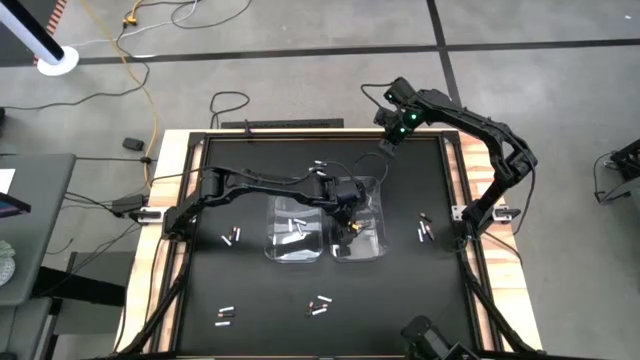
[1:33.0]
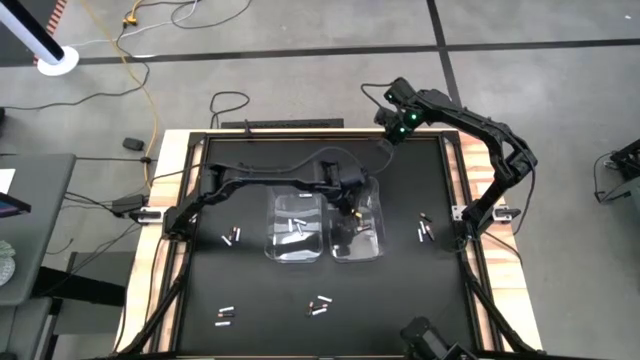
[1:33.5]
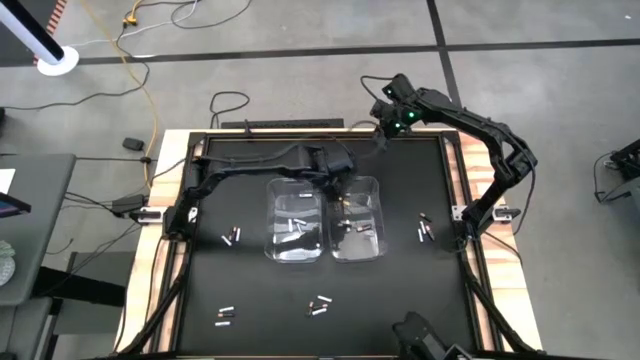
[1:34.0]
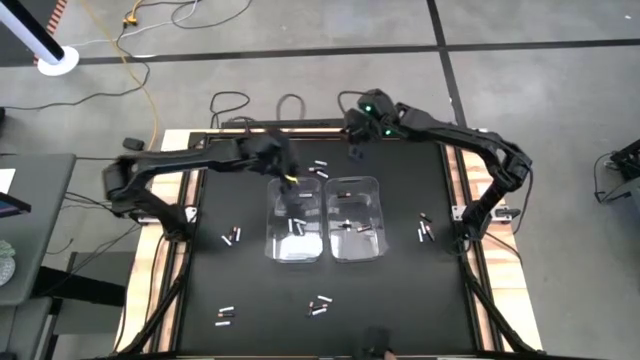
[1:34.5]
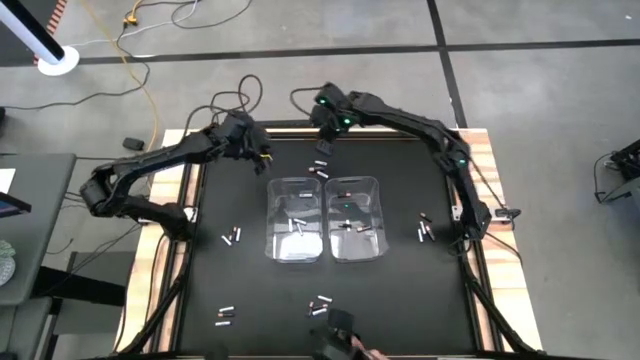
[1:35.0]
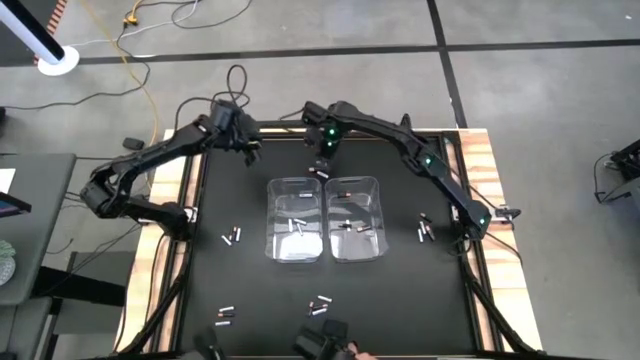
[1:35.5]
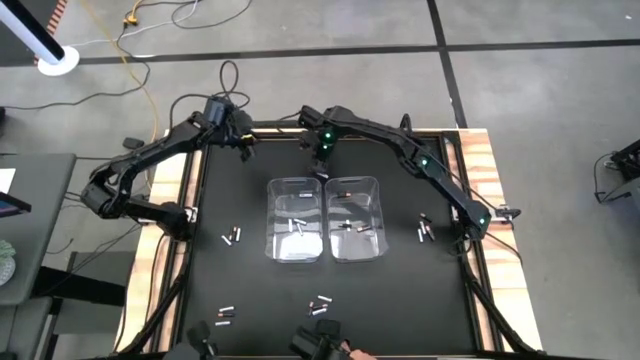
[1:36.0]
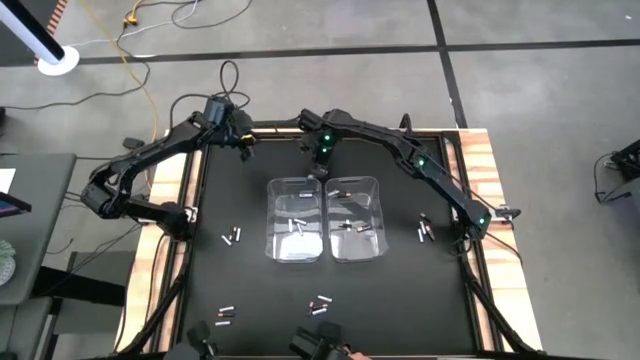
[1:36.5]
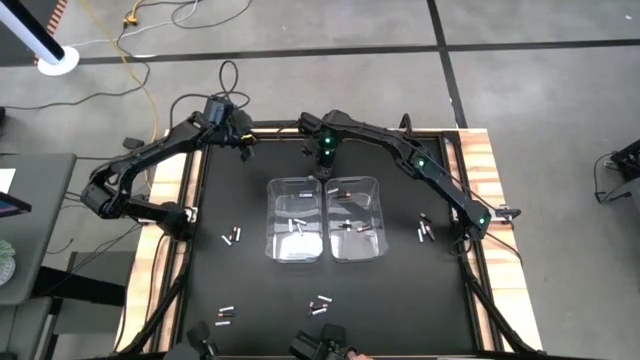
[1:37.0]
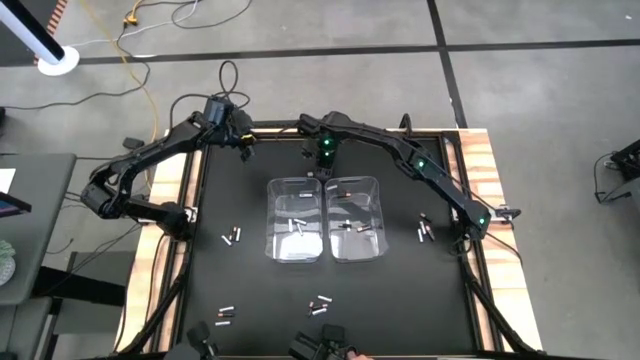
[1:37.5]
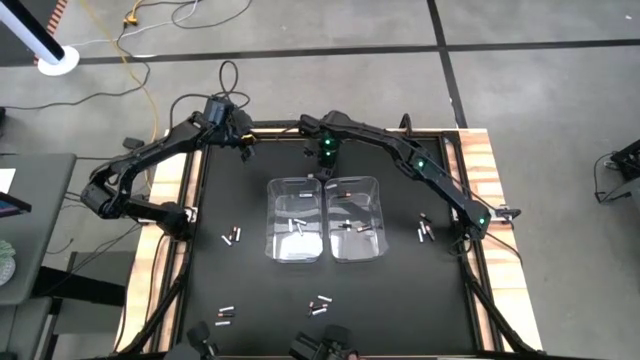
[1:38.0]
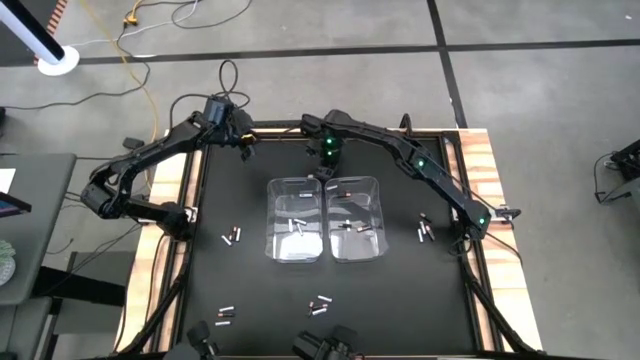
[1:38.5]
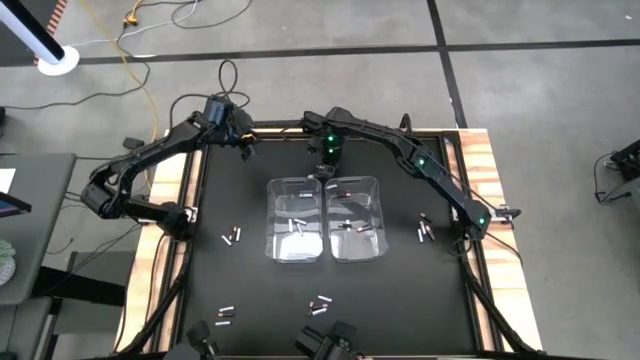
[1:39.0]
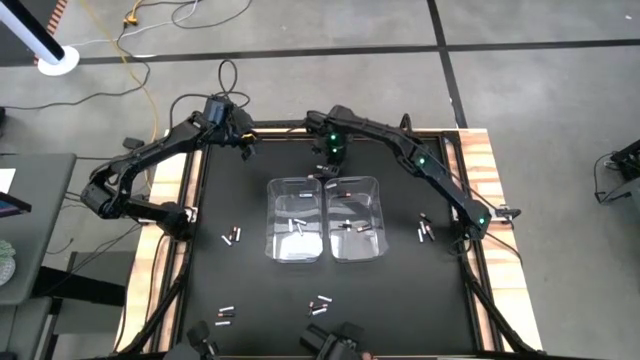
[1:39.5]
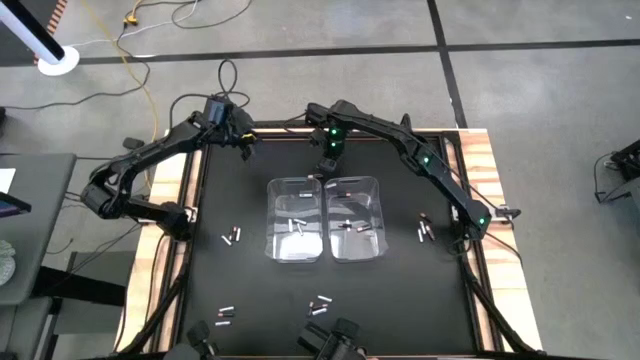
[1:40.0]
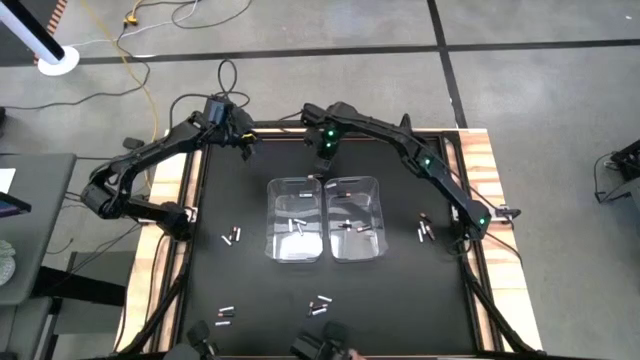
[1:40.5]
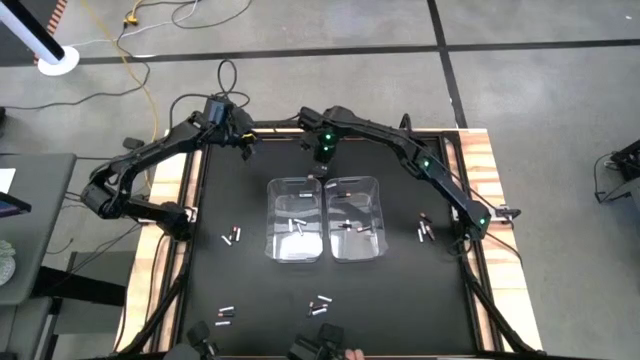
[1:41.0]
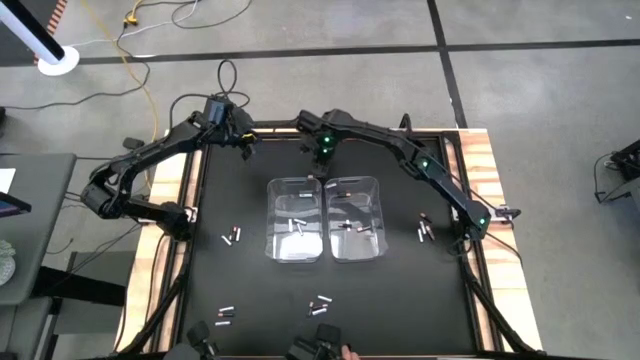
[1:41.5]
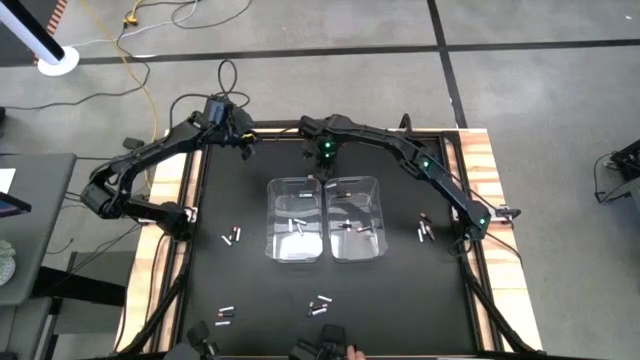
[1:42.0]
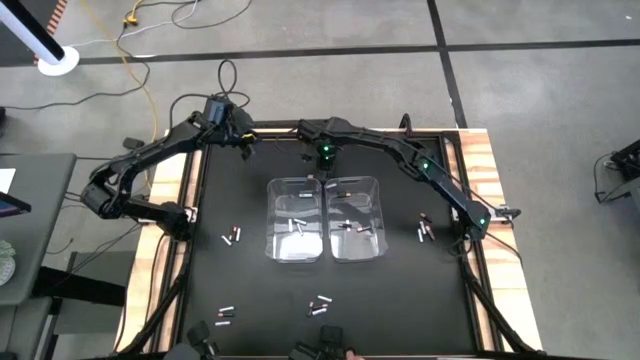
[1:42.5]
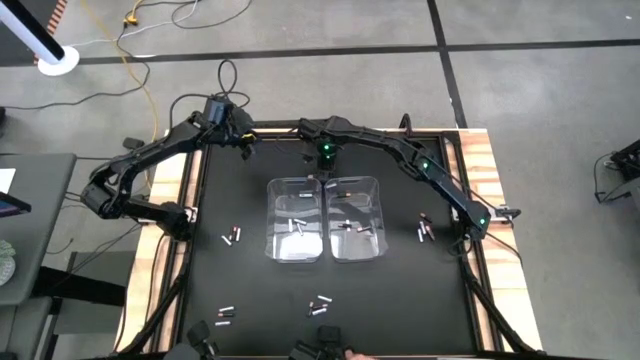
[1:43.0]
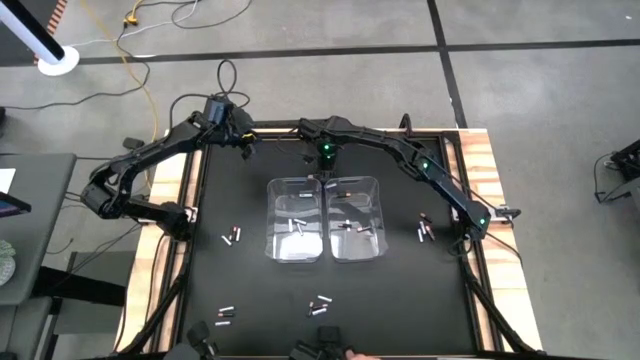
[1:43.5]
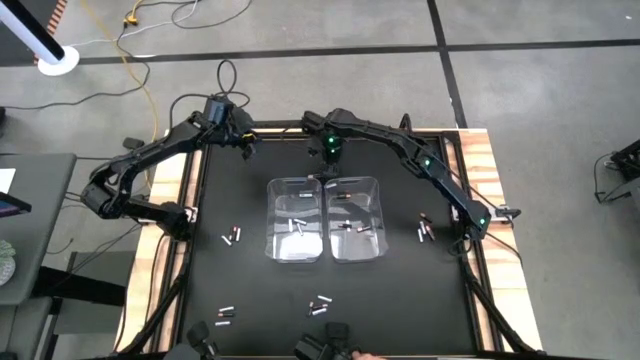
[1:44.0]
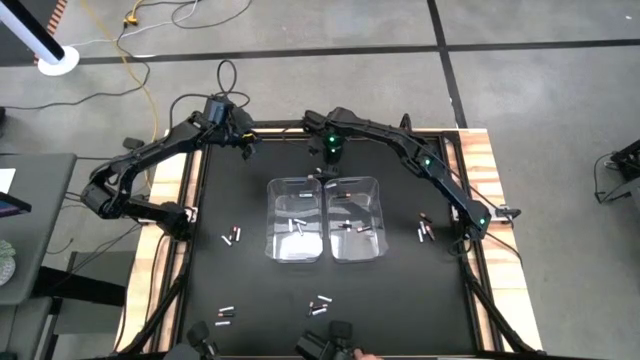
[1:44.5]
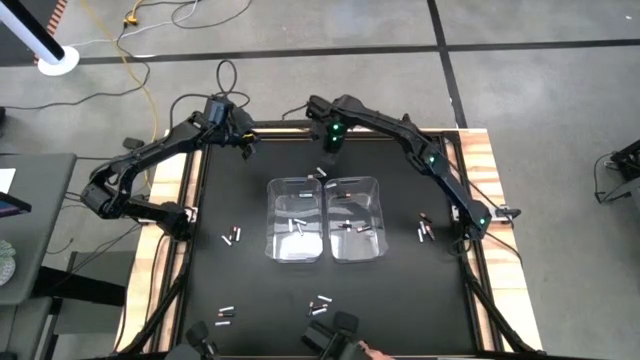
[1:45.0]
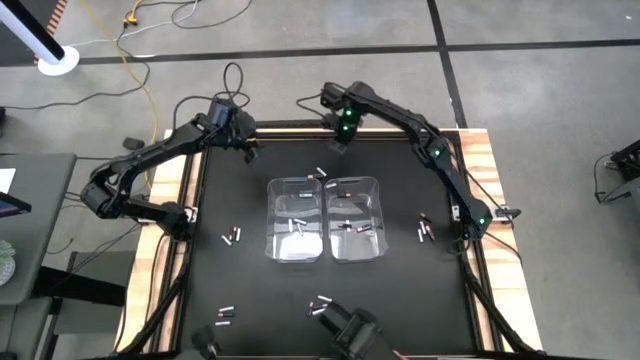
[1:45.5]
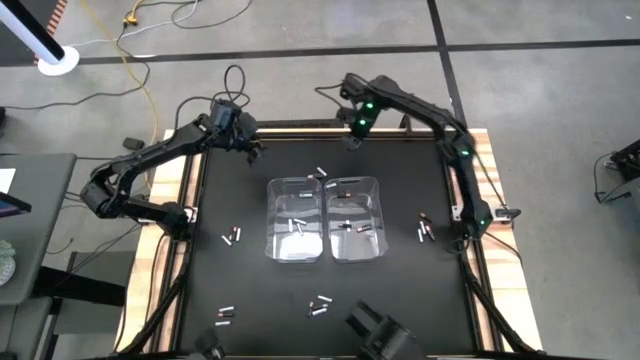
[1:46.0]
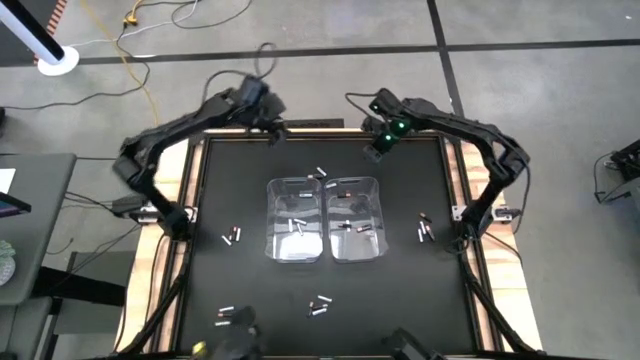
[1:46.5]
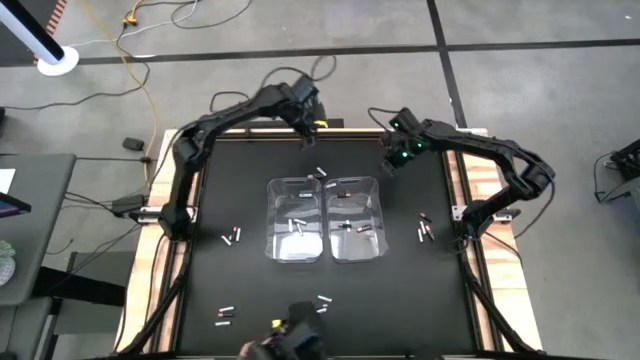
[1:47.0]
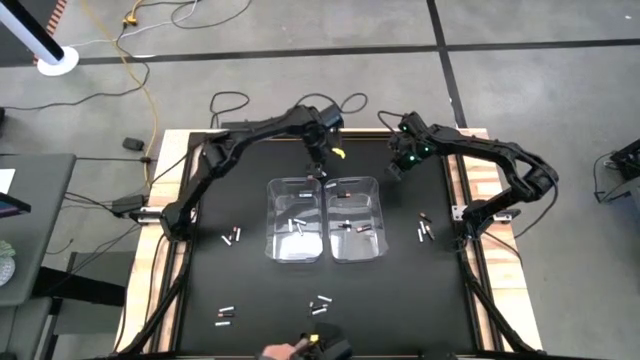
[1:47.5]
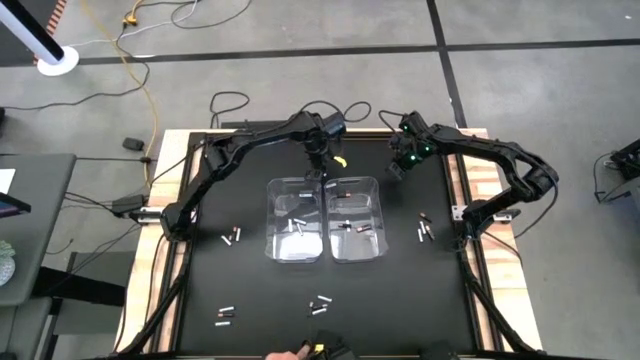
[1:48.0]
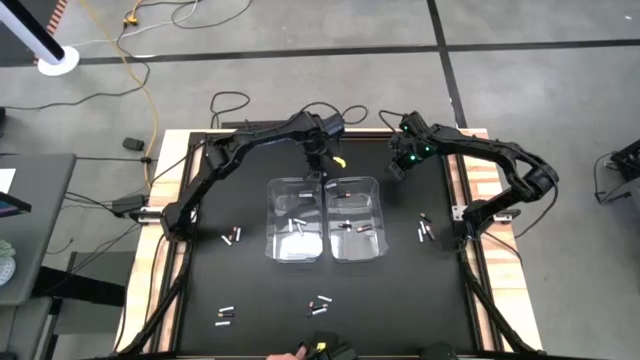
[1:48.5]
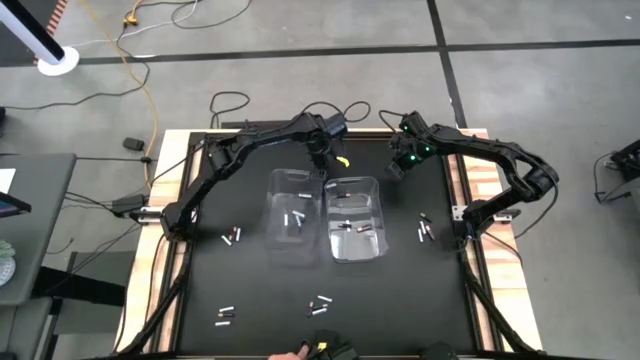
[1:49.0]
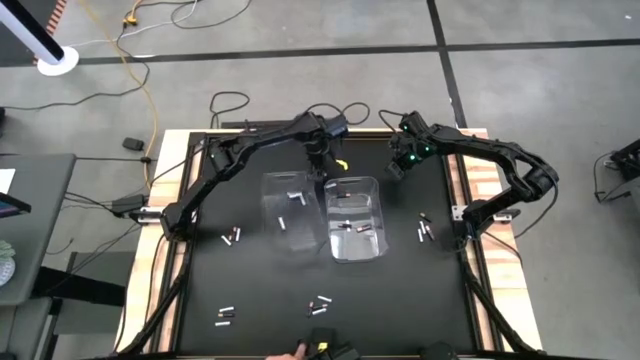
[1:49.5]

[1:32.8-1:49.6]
Task: Sort batteries
Put the white battery into the left transparent bin

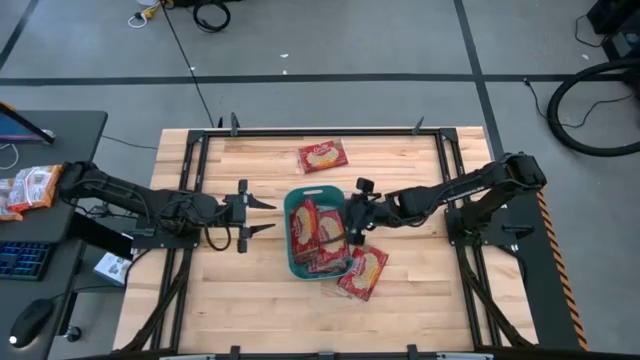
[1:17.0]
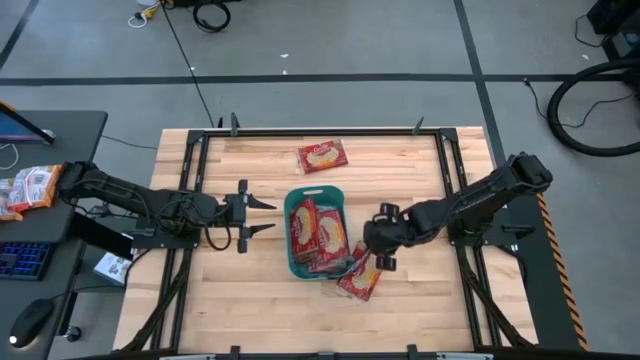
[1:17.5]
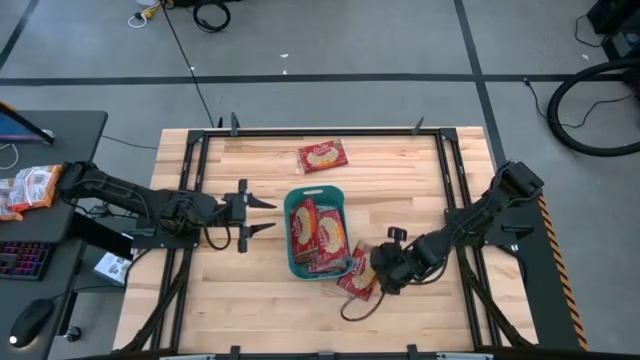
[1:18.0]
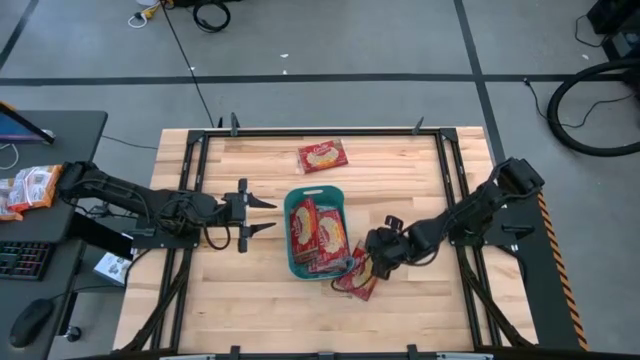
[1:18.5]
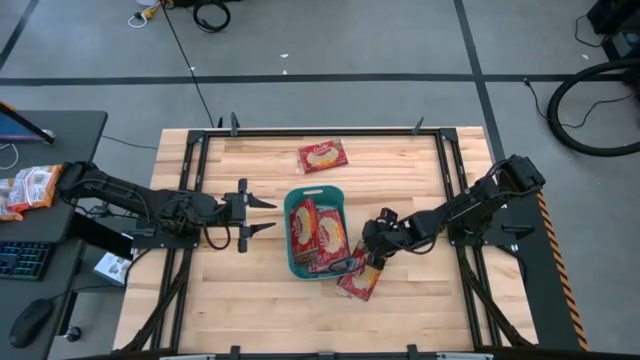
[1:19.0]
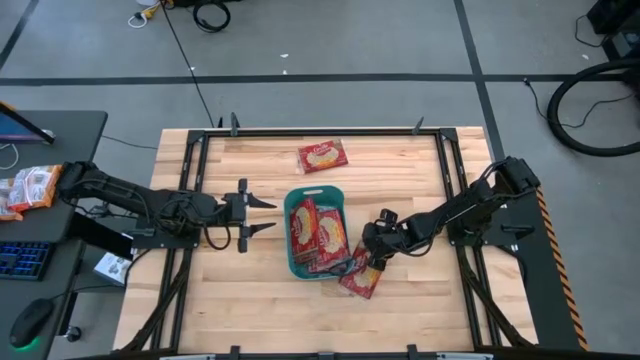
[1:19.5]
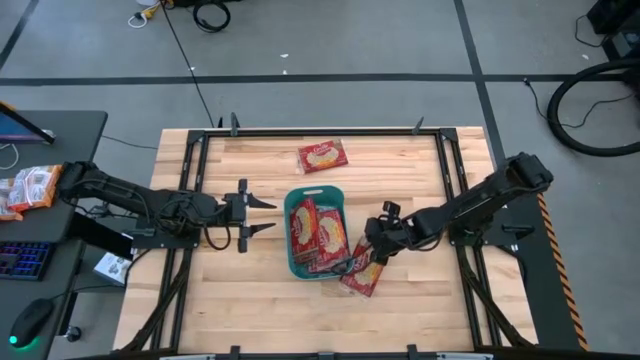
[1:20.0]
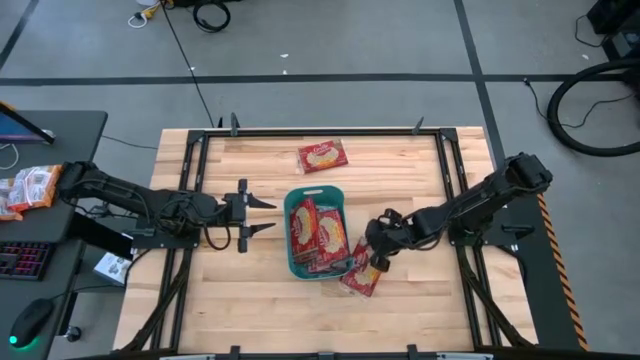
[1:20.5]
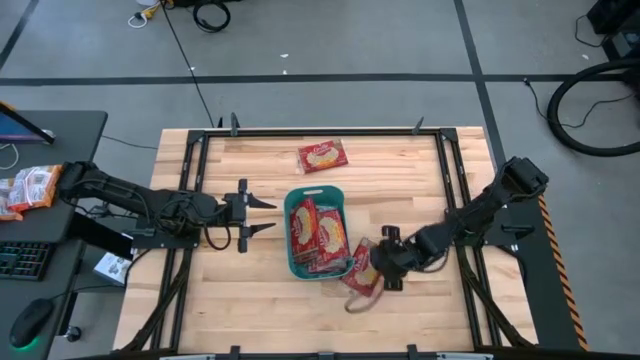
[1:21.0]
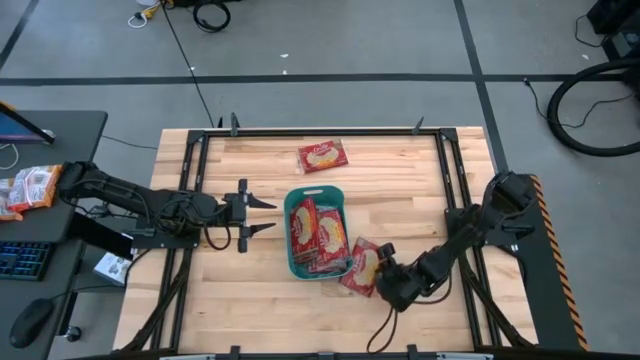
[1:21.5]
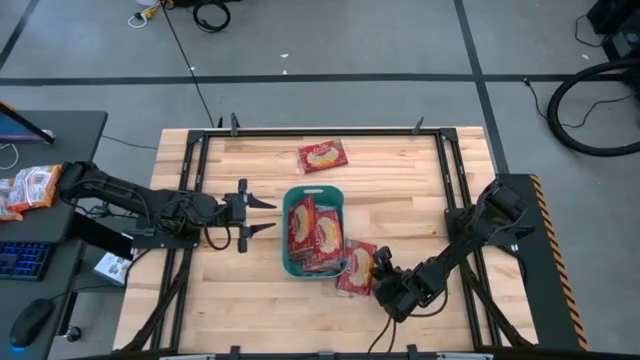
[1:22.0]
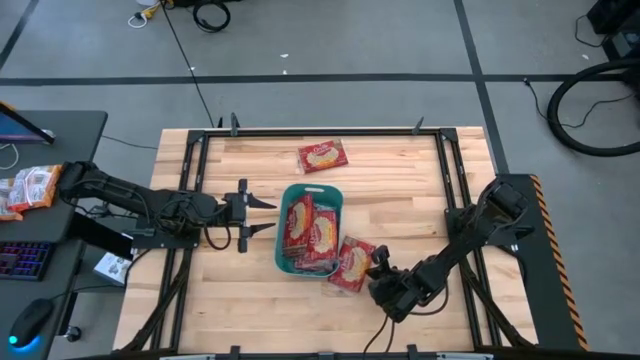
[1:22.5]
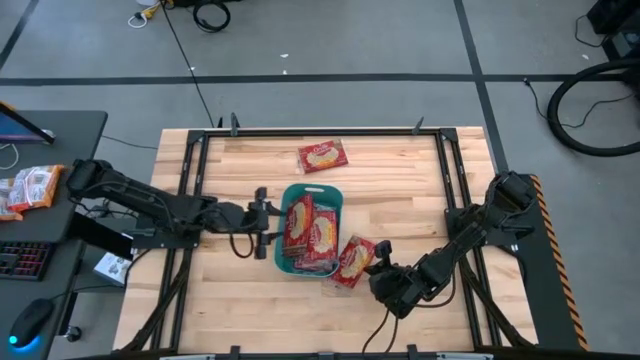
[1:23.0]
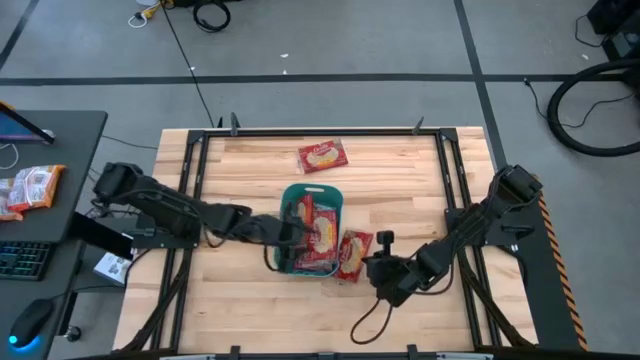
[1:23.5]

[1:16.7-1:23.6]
Task: Sort popcorn bags into baskets
Put the red popcorn bag into the green bin
